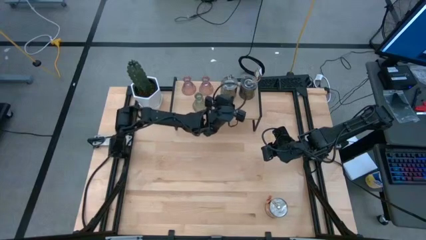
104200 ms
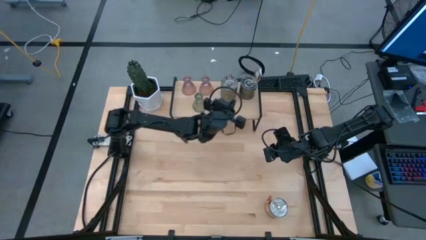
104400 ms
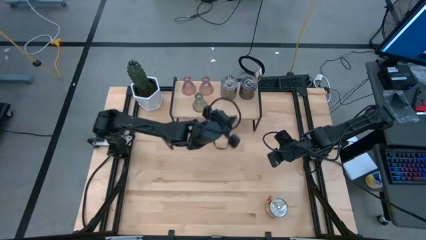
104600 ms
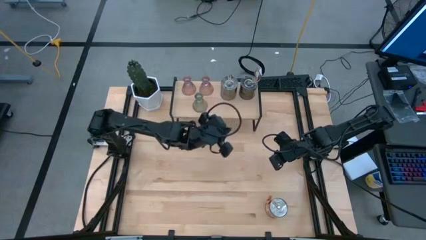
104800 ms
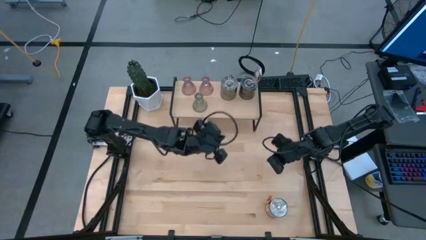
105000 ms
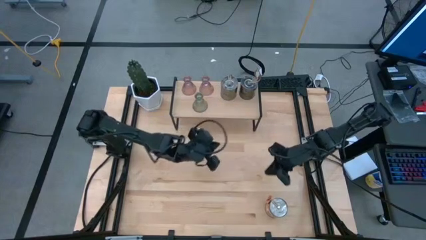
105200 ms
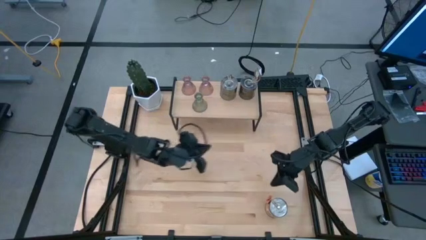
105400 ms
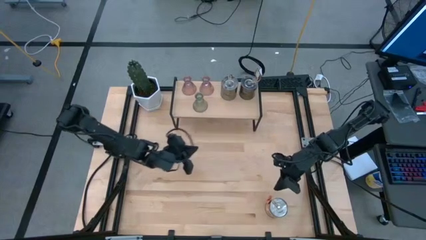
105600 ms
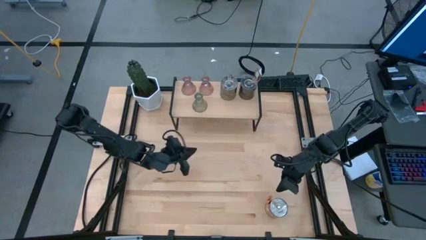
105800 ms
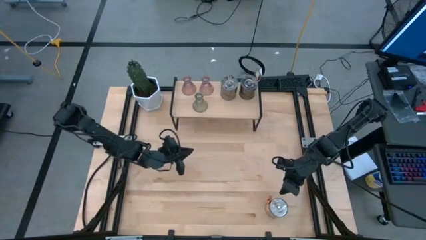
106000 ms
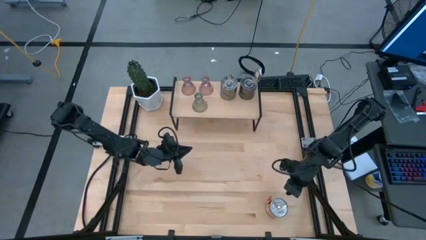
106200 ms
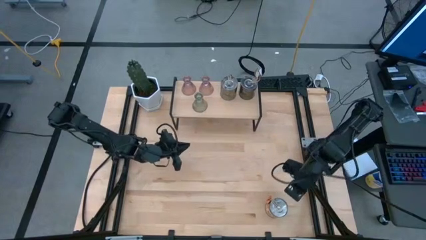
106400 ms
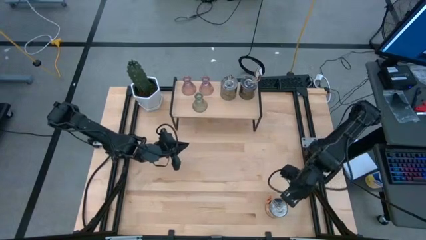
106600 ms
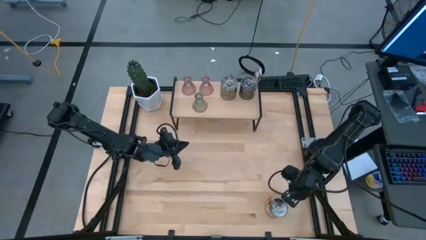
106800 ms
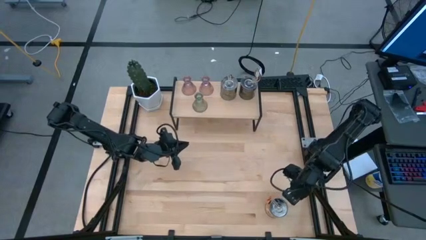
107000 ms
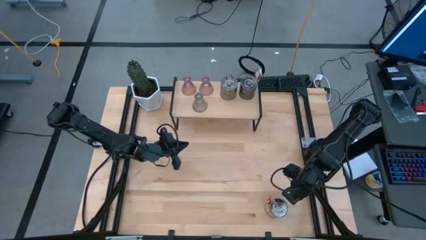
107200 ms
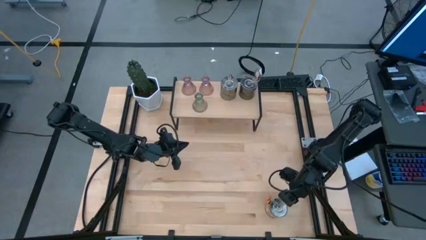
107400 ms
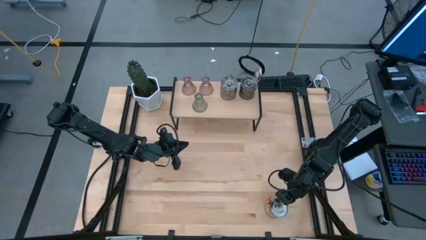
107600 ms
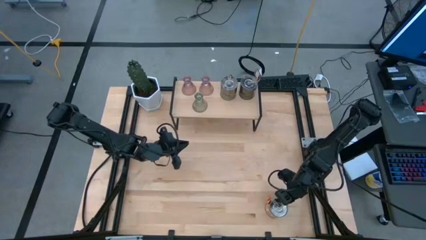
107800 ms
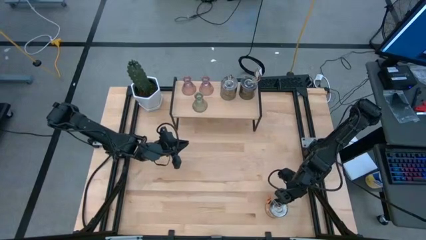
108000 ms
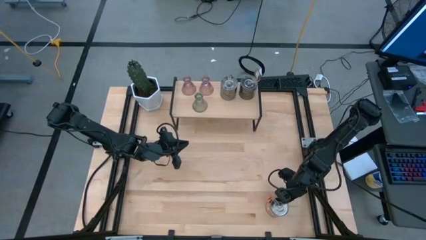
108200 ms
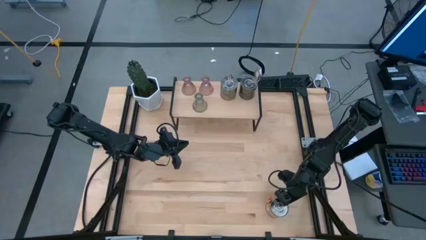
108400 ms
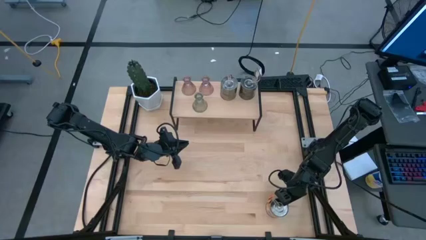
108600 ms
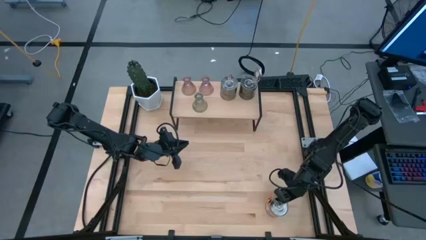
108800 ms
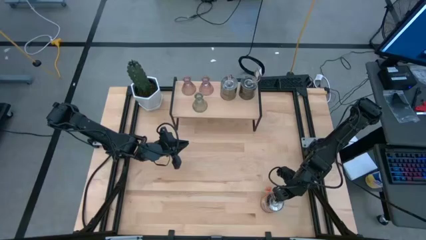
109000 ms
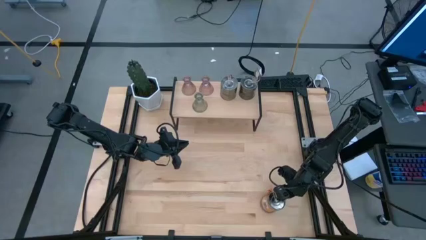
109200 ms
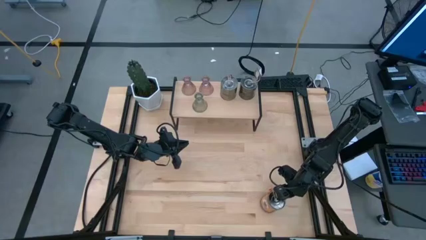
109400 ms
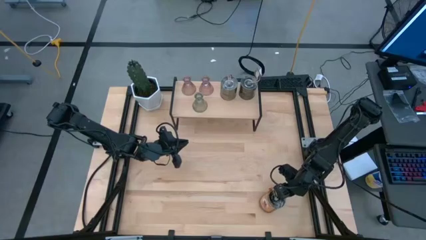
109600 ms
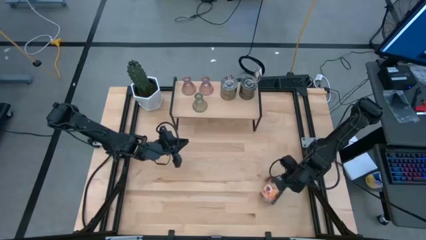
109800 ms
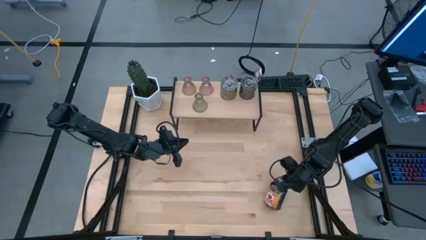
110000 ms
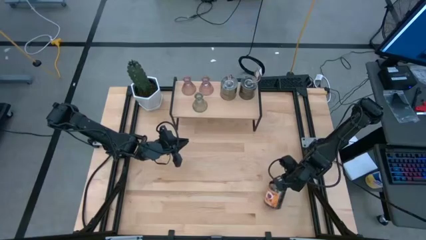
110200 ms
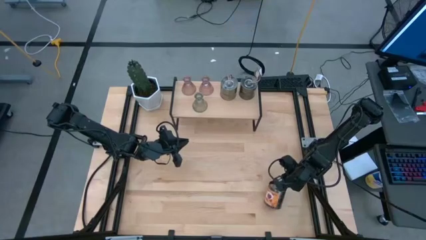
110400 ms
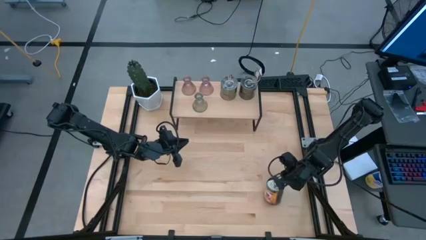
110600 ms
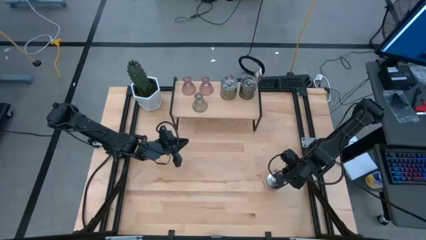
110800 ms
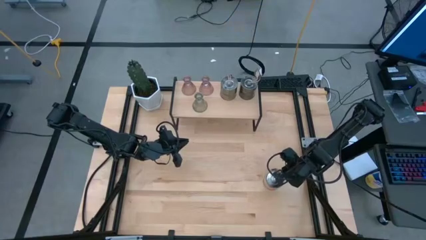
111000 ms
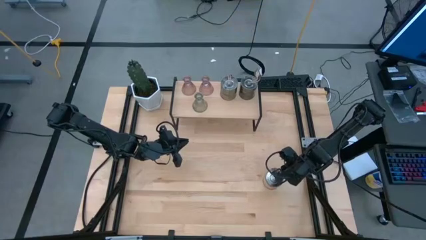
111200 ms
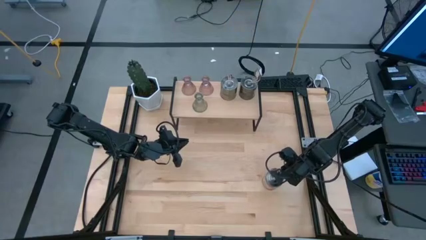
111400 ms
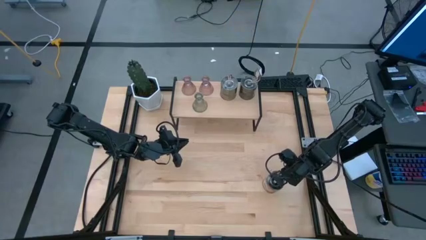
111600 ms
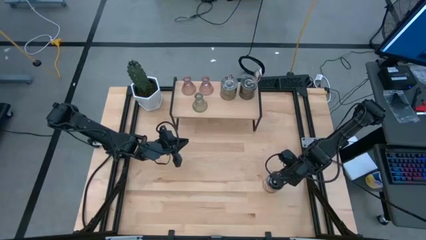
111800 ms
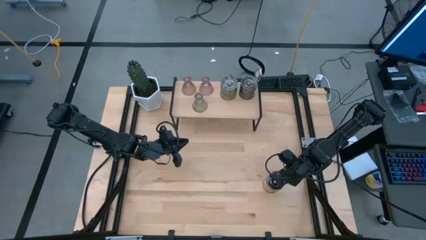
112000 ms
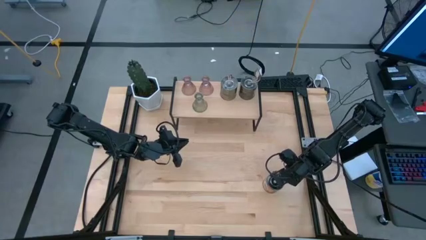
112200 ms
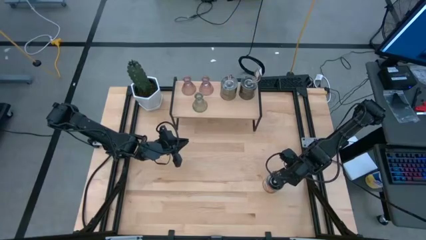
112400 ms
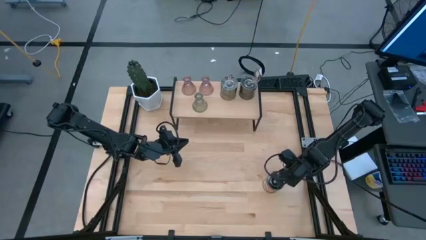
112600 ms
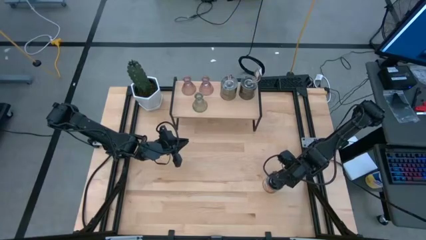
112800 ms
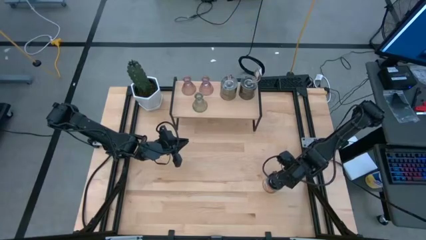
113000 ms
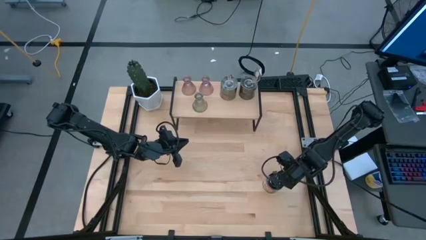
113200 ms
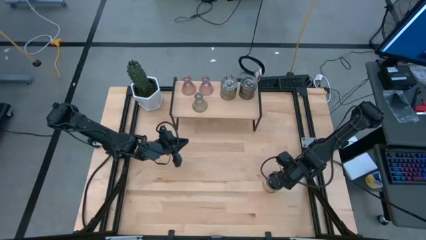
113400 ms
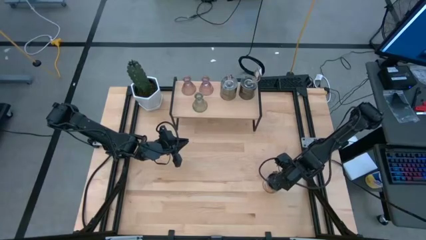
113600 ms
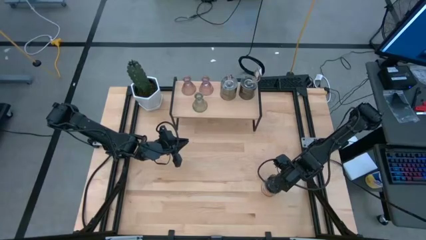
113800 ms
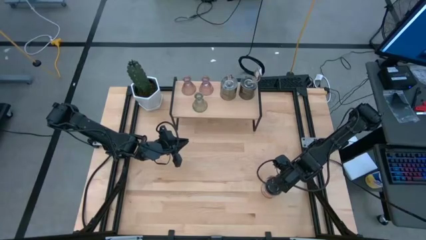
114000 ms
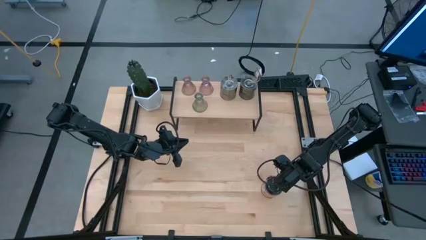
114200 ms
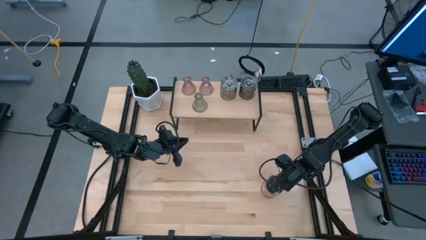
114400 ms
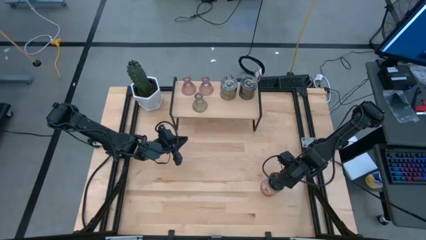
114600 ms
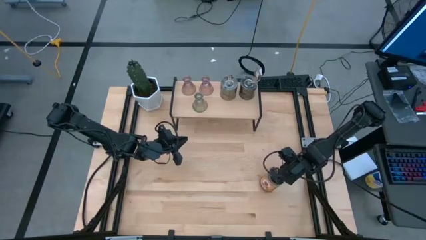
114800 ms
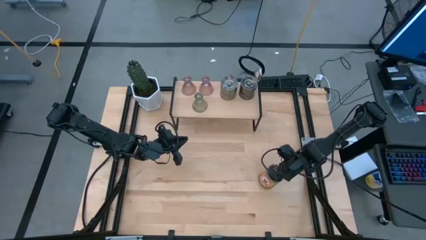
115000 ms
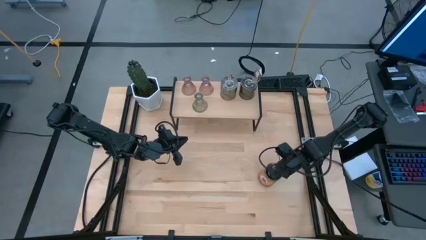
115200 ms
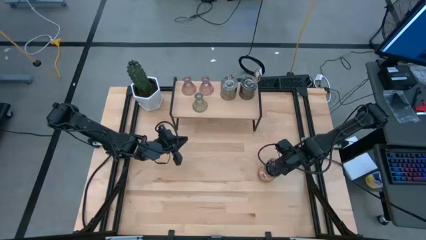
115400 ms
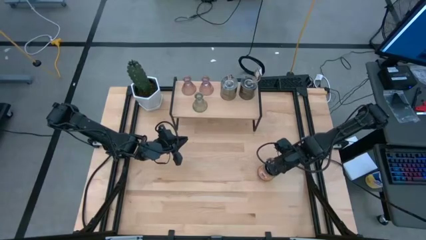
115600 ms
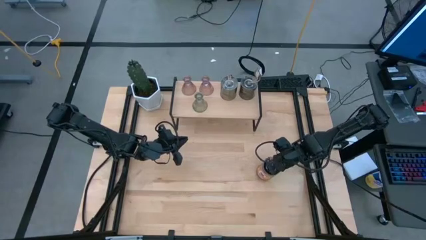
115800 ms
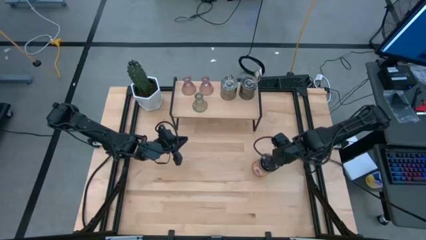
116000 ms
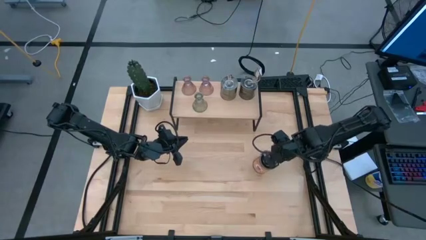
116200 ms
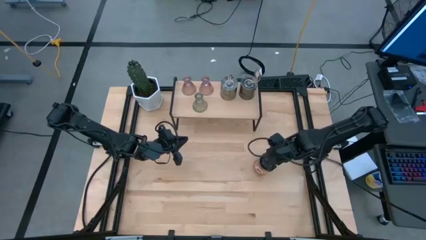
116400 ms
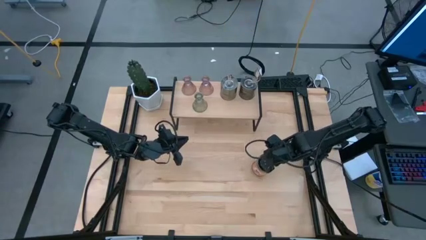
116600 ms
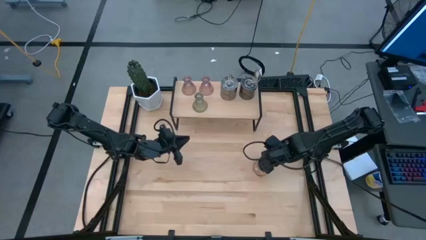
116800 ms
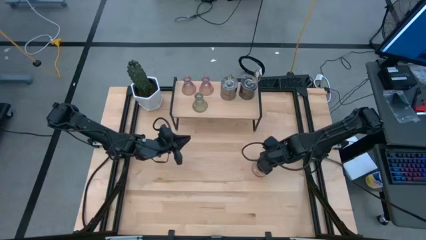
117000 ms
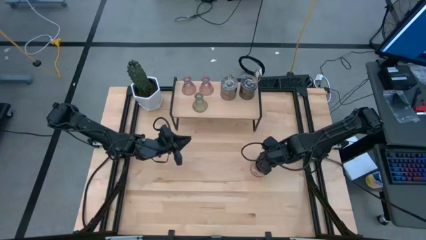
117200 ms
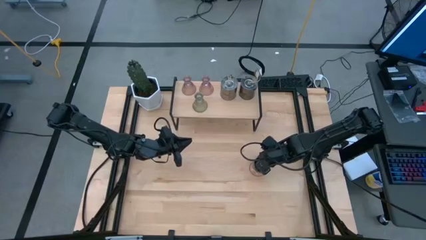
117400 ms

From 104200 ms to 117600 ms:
Task: Pick & Place candle stick holders
Put the silver scented candle on the shelf

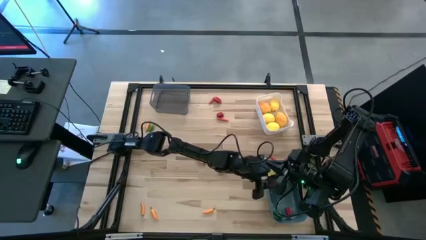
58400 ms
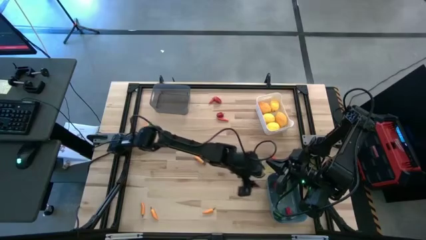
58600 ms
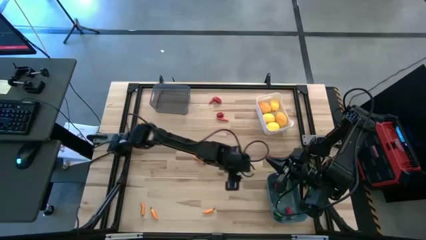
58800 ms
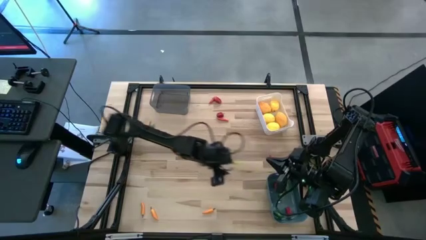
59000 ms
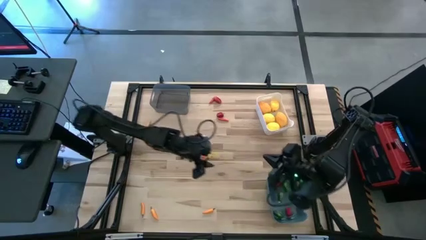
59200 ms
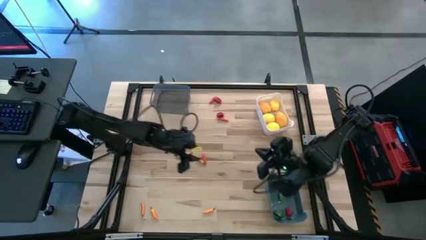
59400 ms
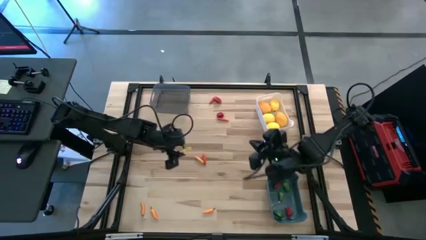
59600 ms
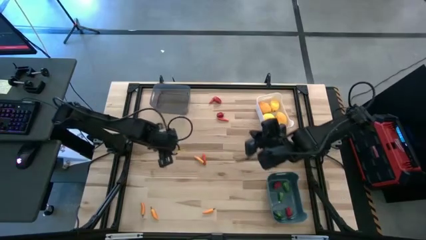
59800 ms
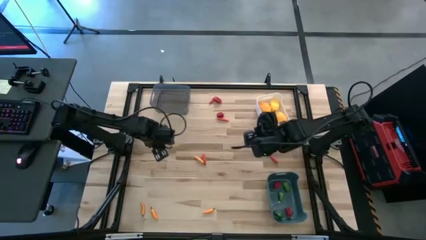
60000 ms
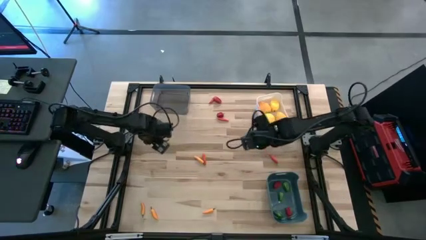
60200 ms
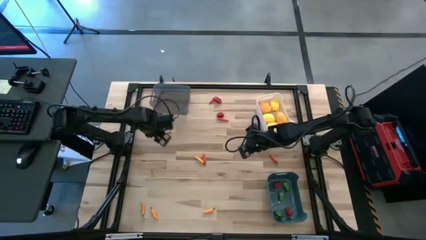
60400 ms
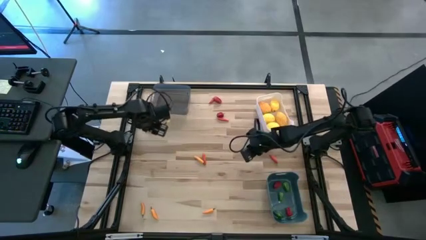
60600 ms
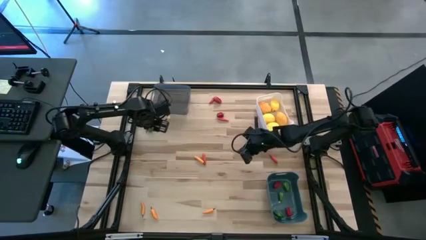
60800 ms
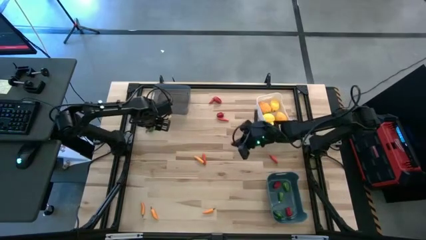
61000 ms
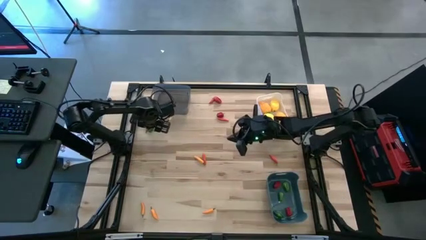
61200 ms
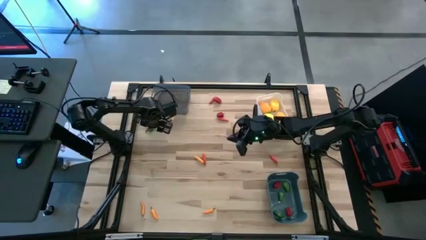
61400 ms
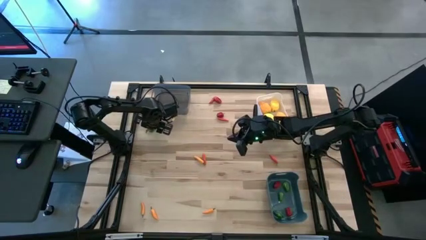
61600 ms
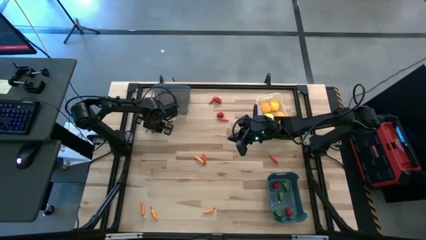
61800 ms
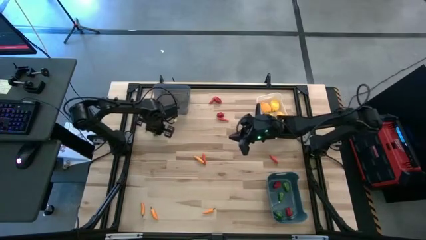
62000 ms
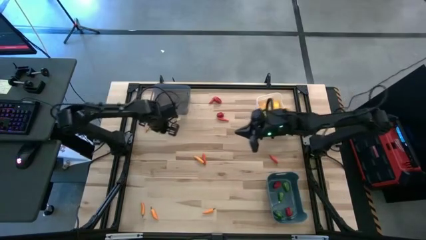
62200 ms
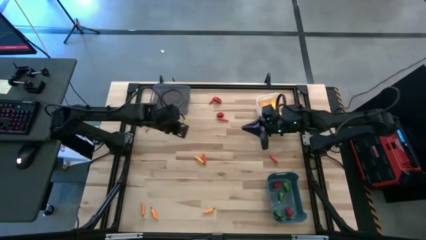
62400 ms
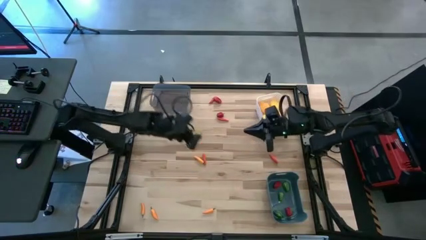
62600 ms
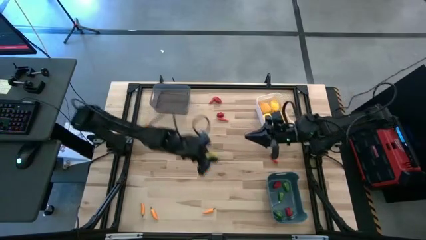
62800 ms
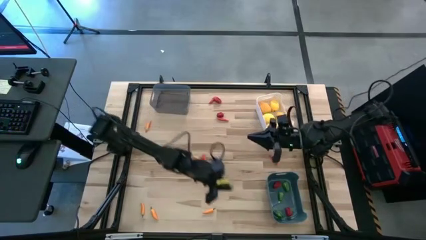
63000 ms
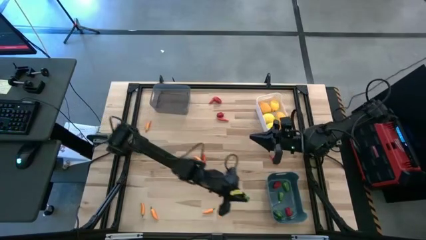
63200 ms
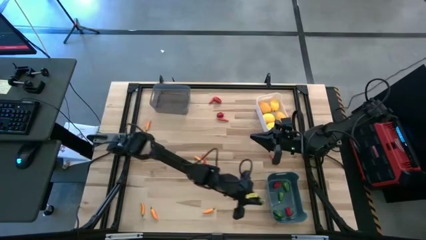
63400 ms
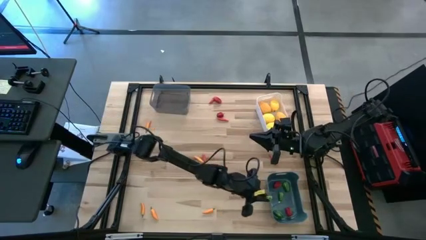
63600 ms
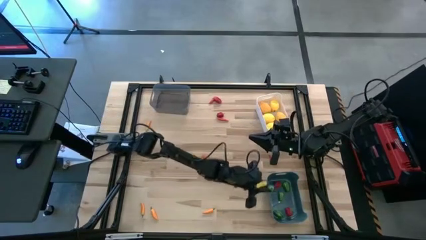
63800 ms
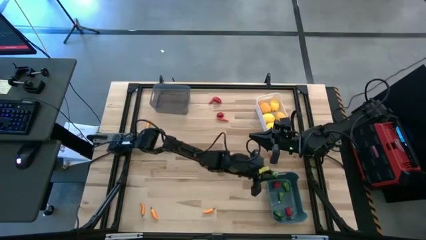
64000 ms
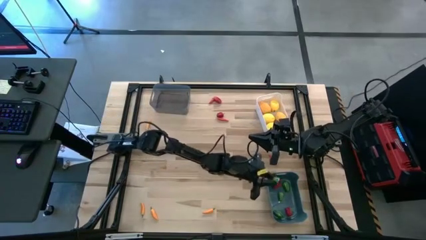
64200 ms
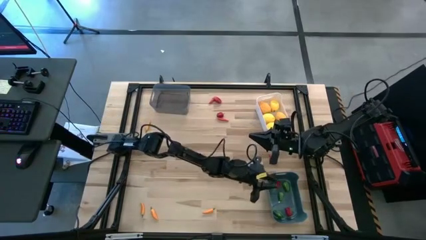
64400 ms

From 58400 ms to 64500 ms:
Task: Sort produce into baskets
Put the green chili pepper into the blue bin
